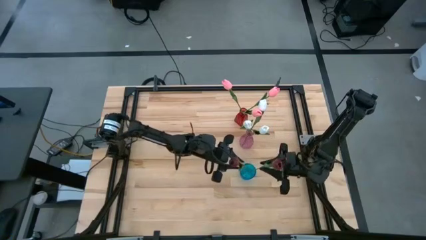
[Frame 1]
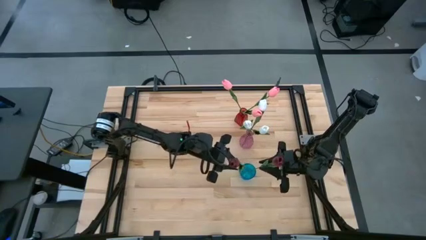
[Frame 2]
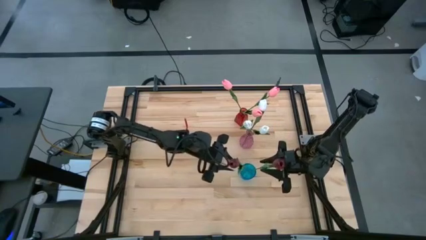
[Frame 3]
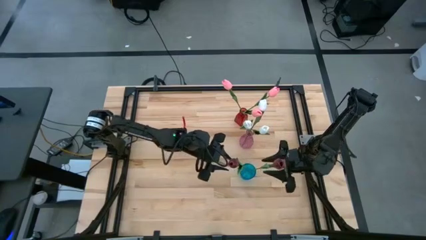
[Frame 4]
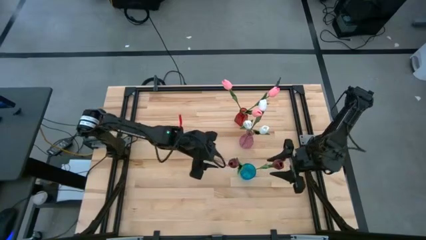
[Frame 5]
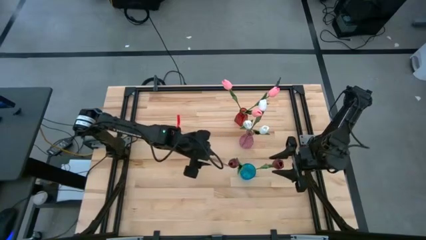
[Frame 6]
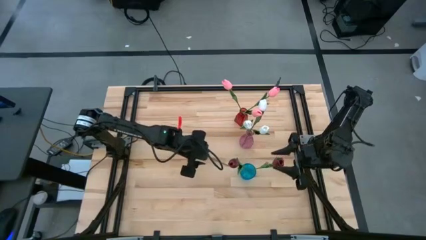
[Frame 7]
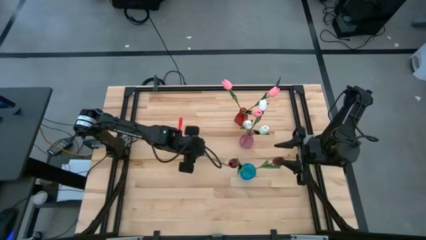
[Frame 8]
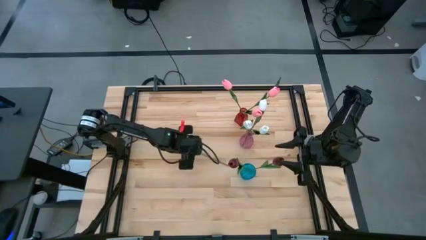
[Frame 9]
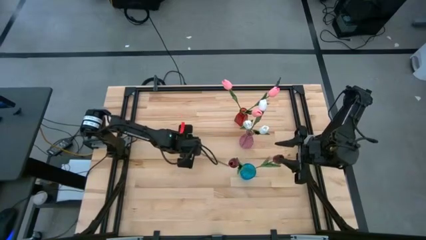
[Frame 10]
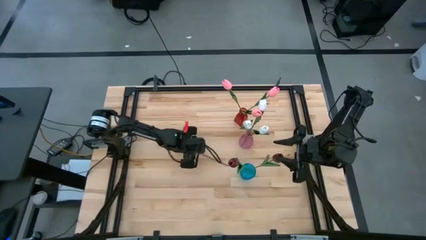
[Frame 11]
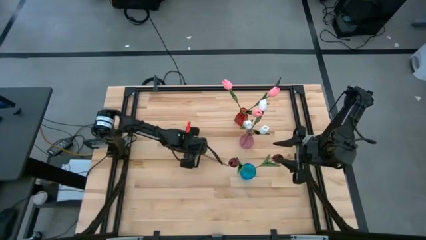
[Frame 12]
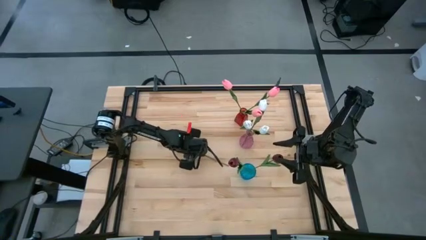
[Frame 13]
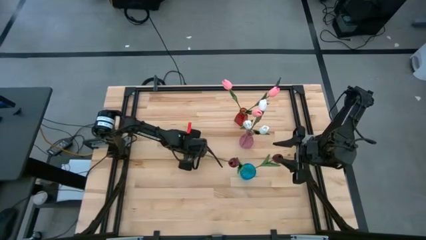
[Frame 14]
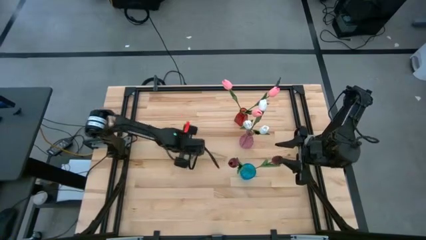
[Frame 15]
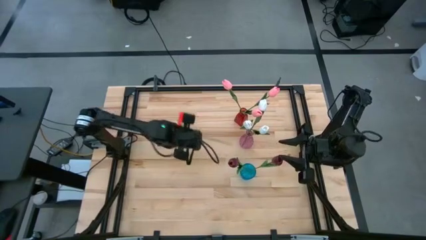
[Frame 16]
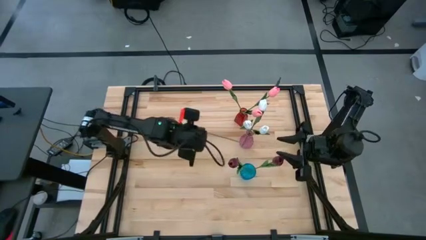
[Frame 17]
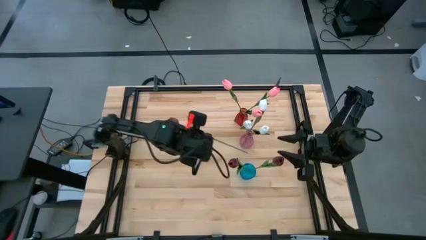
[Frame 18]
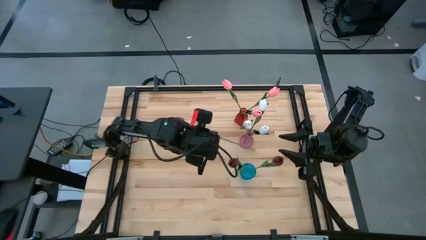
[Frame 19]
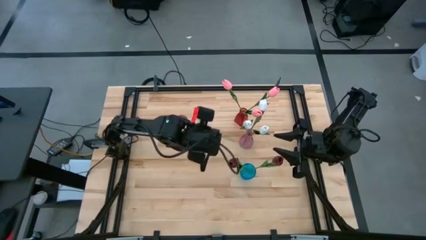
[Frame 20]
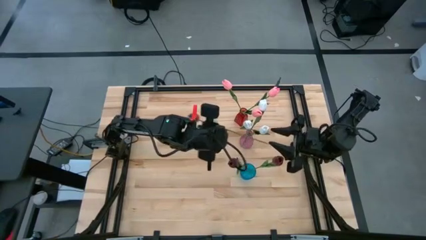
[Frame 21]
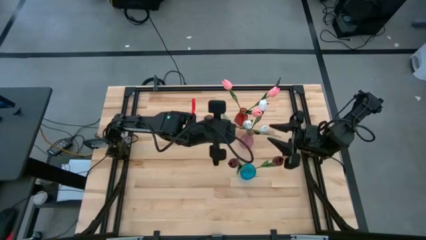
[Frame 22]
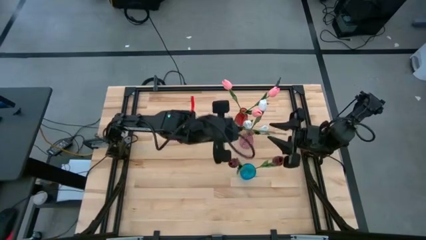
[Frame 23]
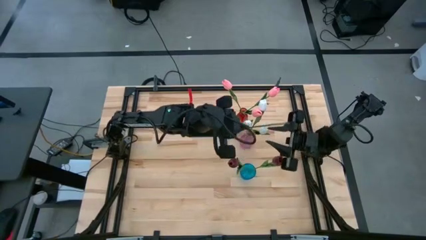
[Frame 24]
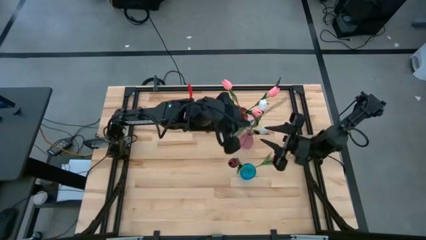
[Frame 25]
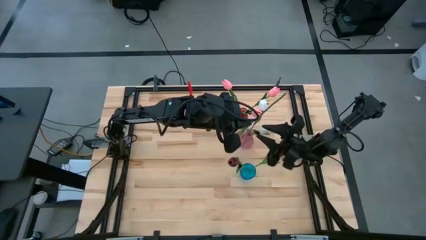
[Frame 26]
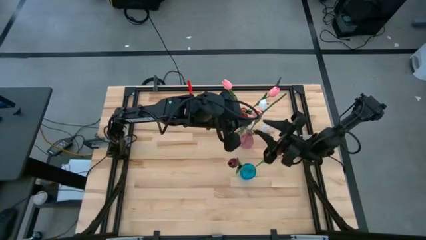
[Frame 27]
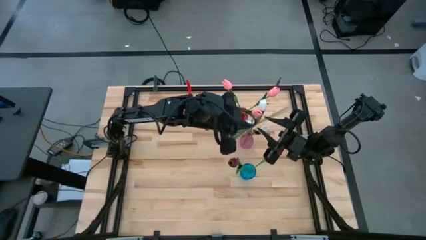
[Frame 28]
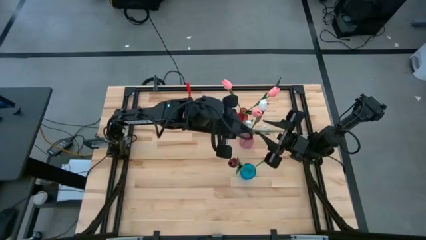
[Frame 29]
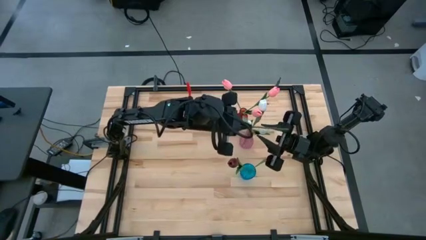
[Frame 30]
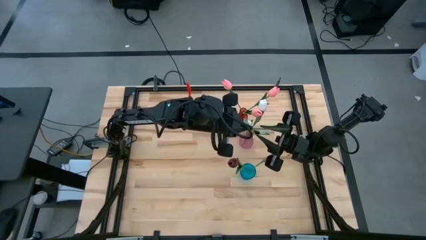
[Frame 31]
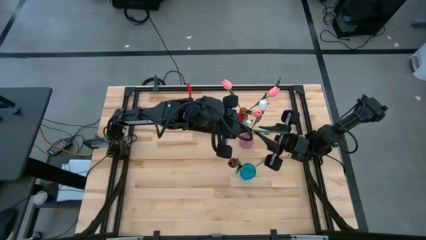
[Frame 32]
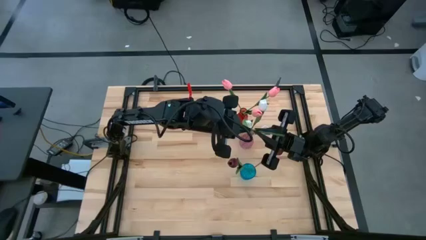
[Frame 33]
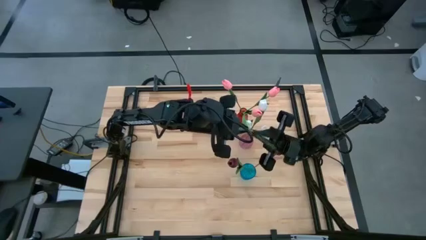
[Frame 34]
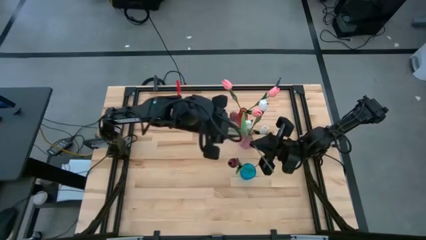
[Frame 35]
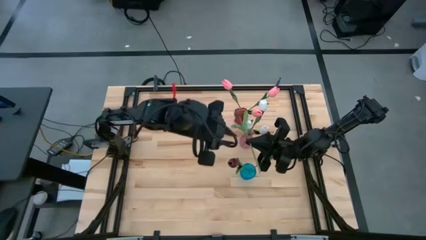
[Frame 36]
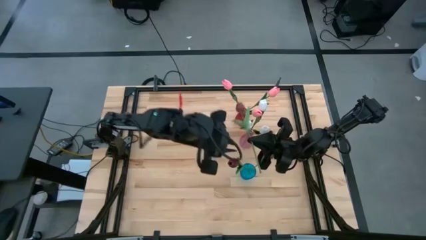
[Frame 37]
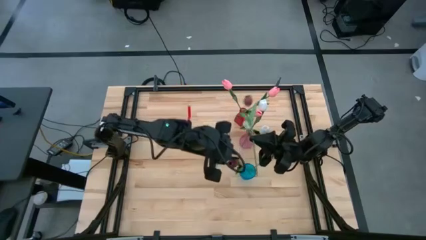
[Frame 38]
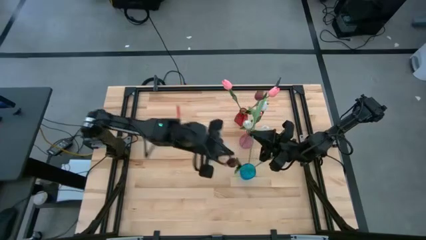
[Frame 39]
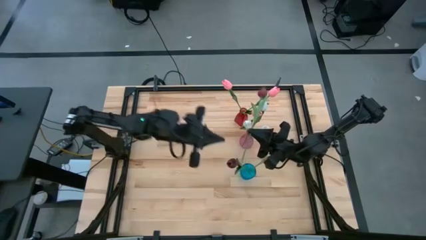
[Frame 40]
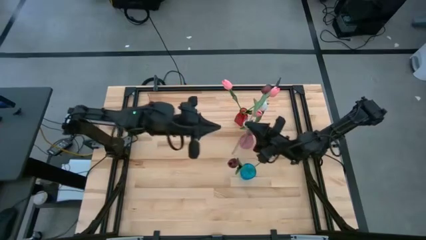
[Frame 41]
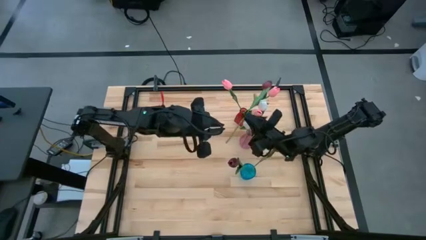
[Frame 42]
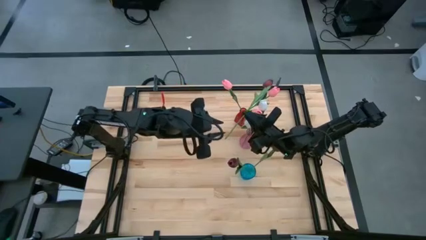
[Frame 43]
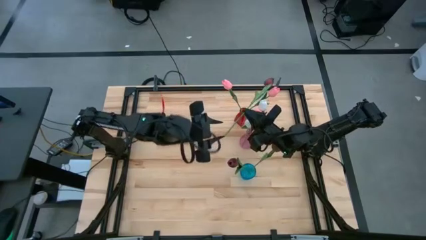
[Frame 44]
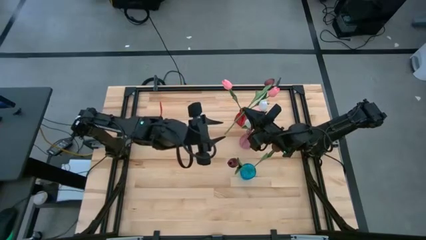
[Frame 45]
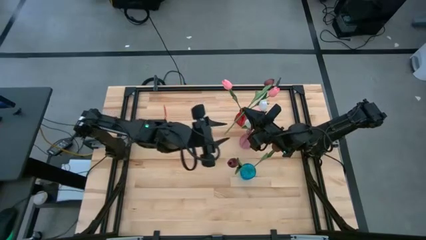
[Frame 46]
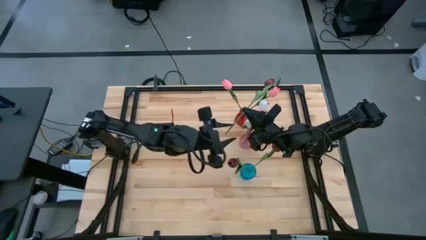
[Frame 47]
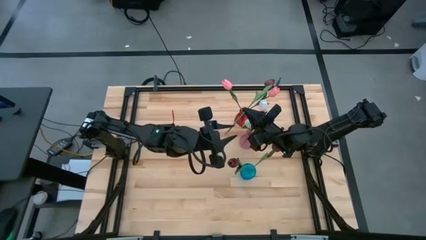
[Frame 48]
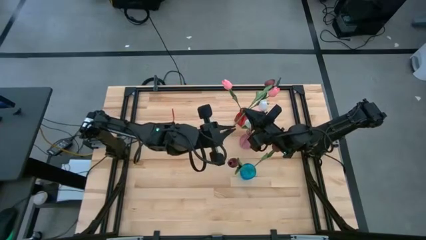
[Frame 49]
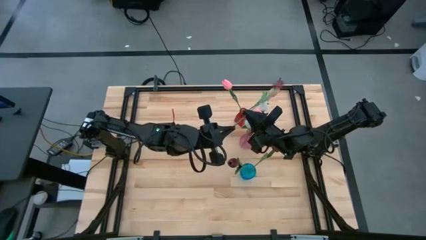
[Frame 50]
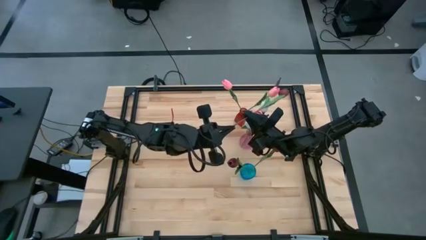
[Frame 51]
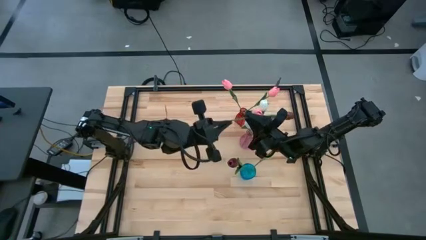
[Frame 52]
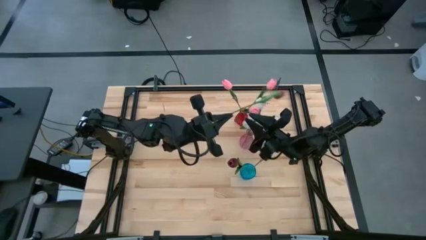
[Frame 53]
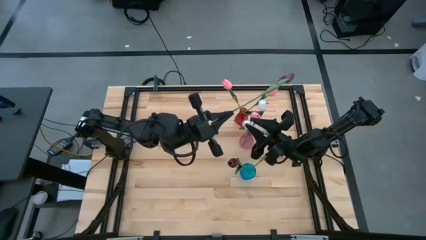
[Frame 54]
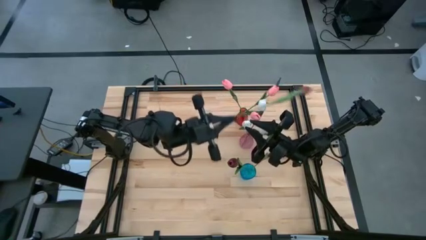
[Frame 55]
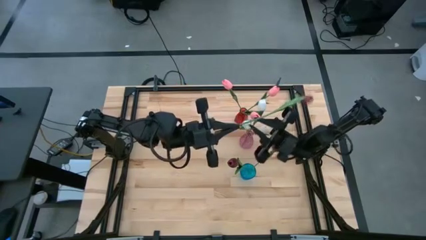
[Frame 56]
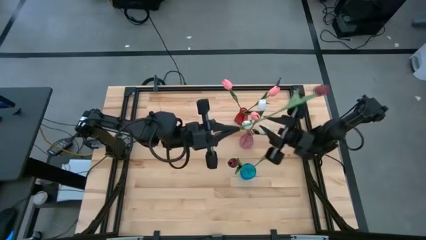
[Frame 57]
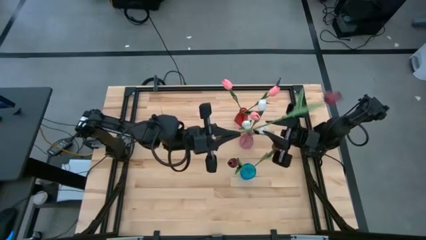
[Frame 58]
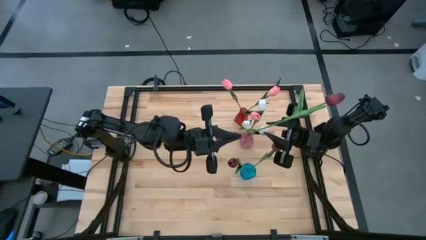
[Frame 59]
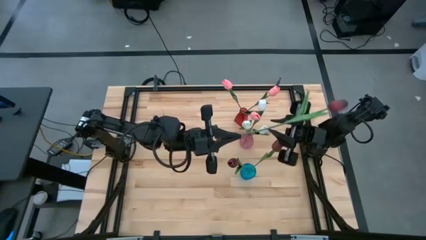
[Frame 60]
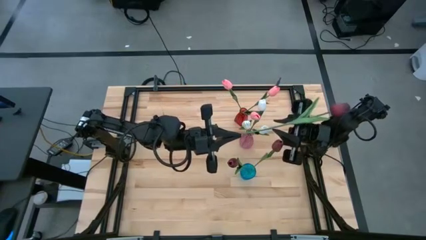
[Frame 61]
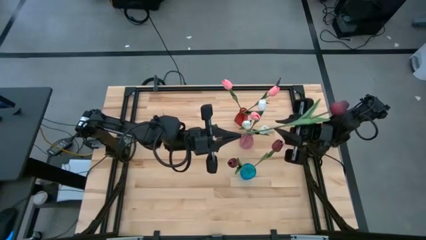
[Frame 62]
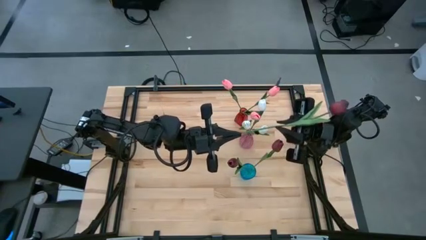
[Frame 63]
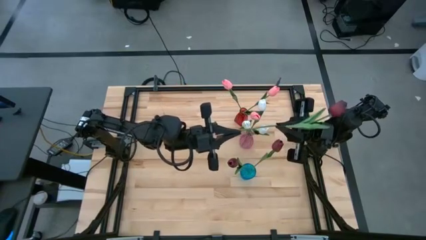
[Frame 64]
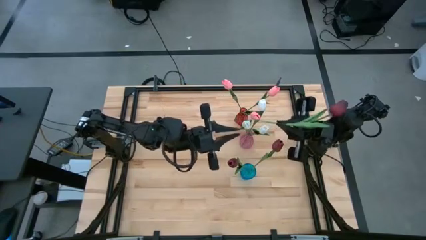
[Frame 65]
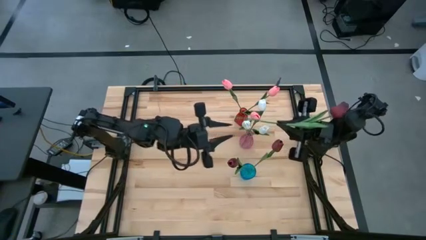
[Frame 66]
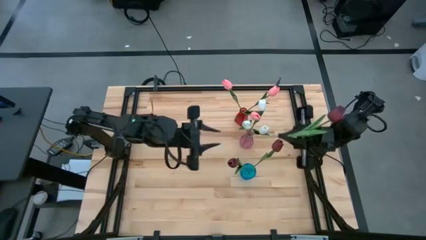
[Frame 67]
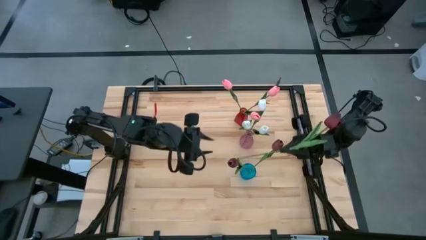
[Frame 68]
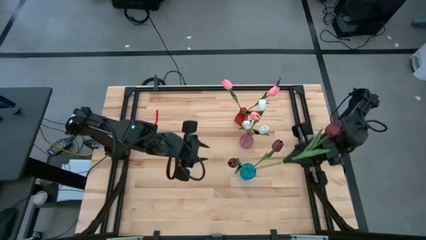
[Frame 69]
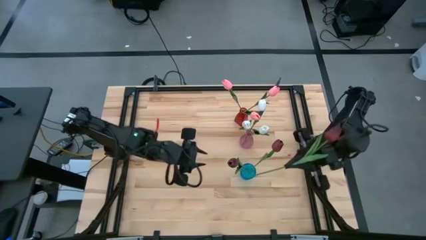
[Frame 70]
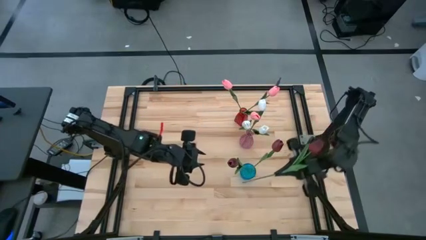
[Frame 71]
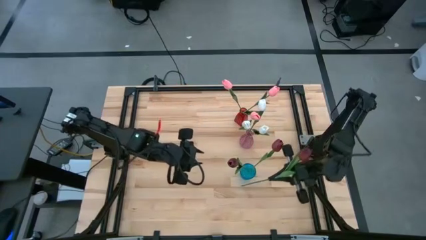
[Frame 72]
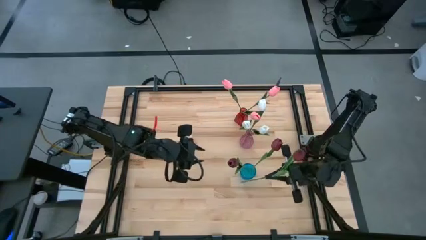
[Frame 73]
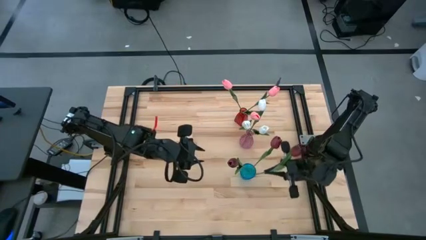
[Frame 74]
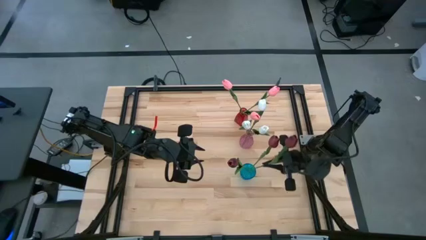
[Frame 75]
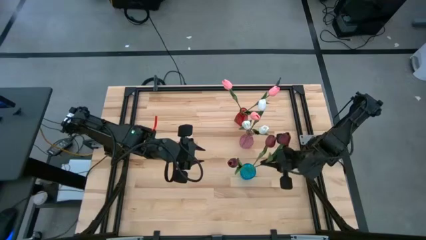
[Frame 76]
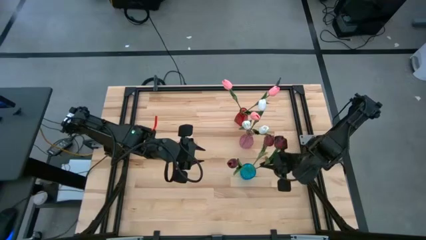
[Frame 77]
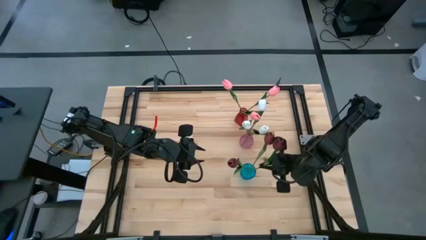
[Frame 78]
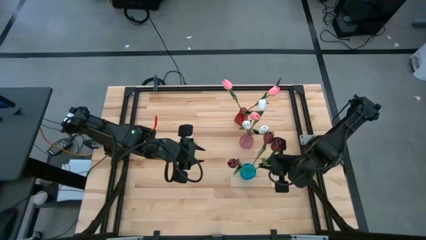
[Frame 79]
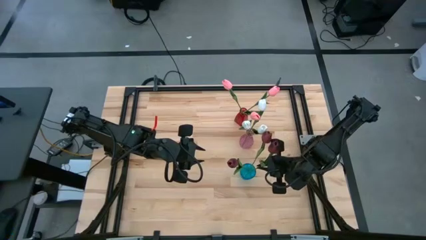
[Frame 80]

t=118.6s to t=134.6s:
Task: Sort flowers into vase by color
Put the red tulip into the blue vase
